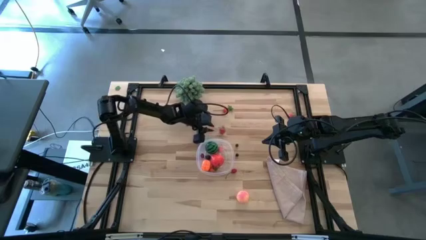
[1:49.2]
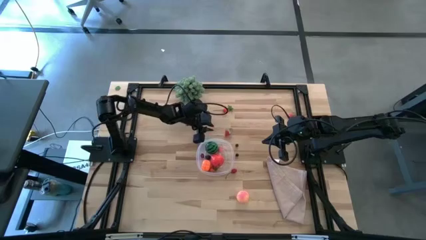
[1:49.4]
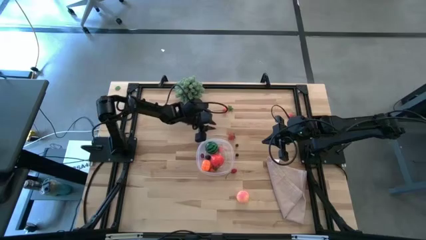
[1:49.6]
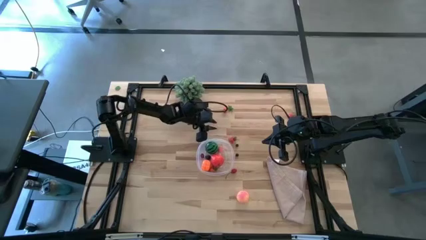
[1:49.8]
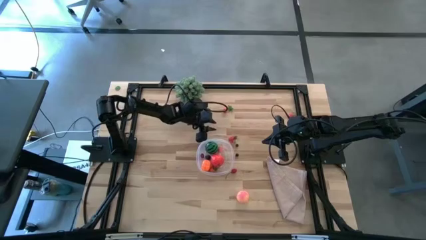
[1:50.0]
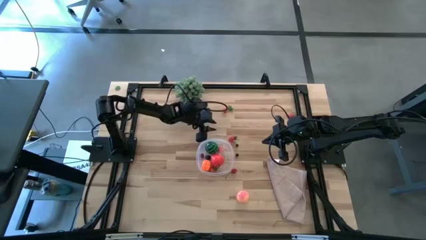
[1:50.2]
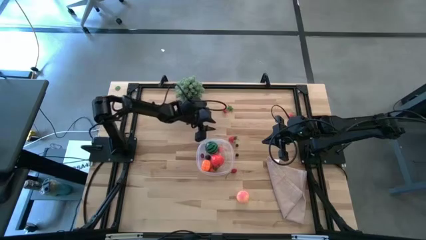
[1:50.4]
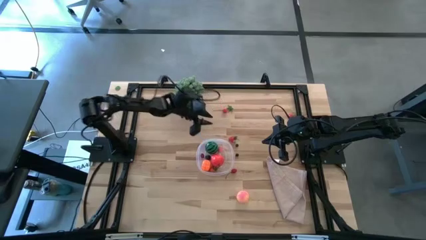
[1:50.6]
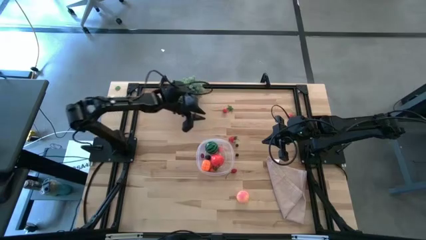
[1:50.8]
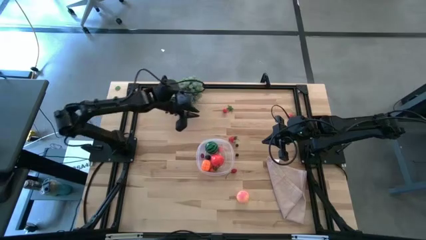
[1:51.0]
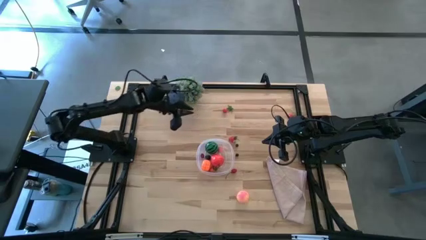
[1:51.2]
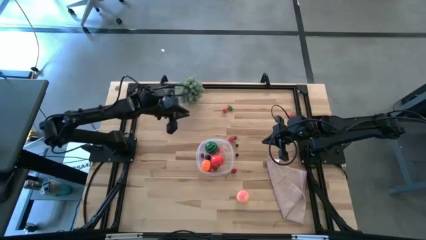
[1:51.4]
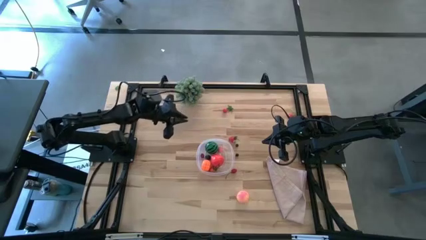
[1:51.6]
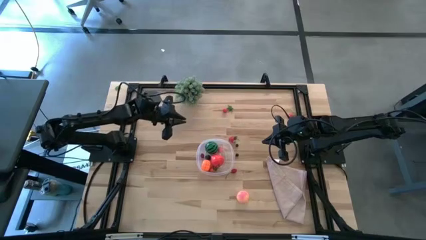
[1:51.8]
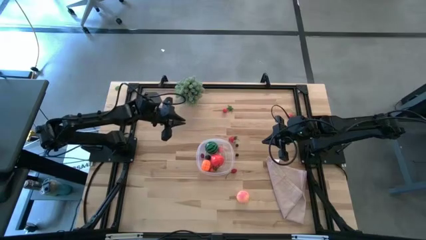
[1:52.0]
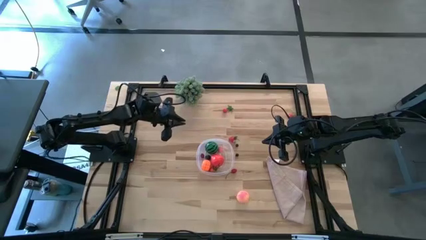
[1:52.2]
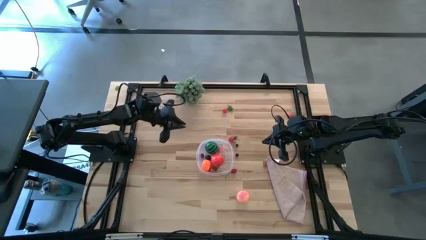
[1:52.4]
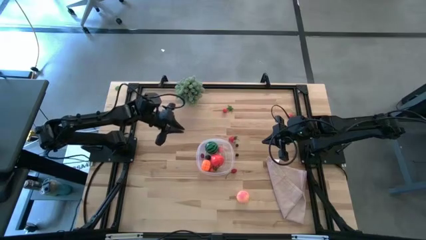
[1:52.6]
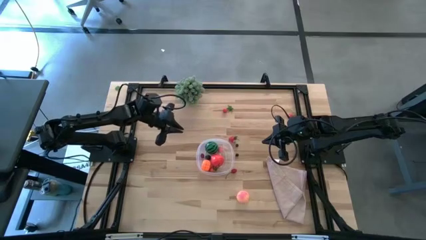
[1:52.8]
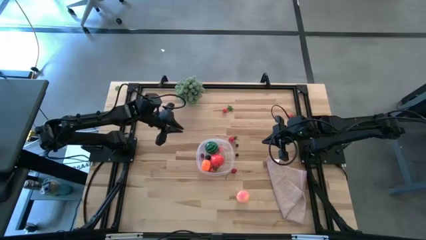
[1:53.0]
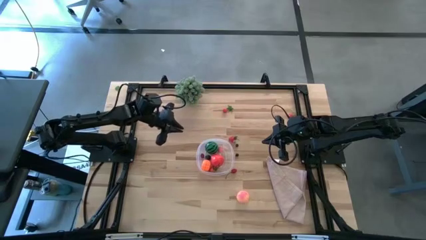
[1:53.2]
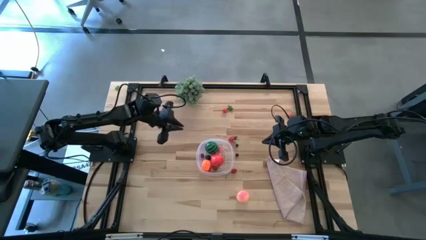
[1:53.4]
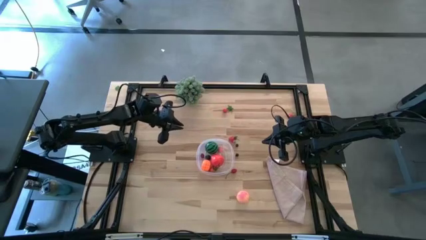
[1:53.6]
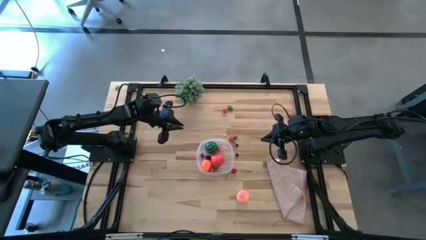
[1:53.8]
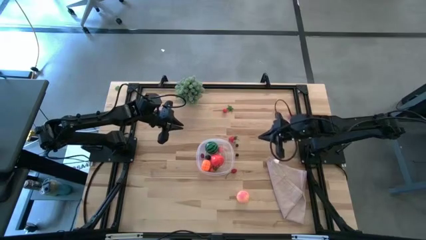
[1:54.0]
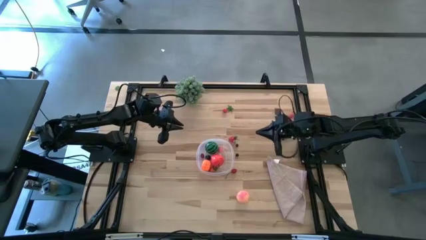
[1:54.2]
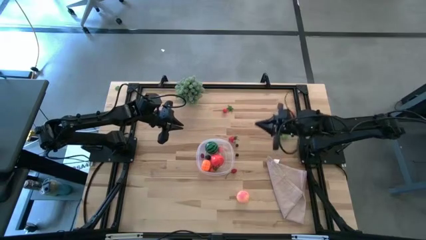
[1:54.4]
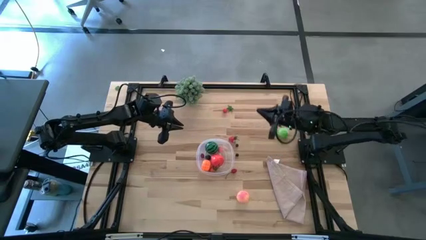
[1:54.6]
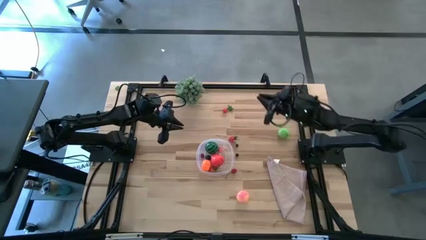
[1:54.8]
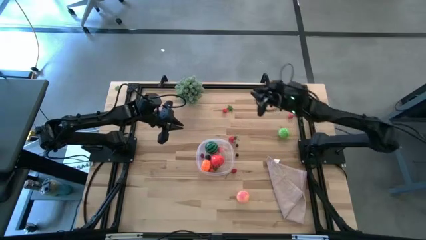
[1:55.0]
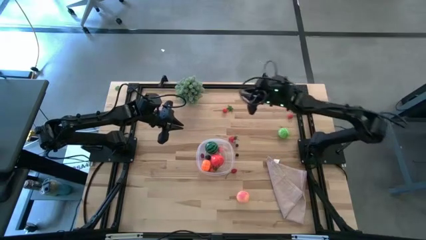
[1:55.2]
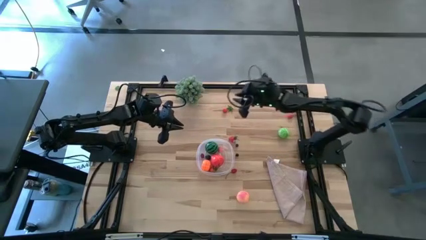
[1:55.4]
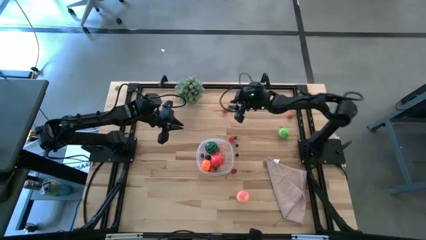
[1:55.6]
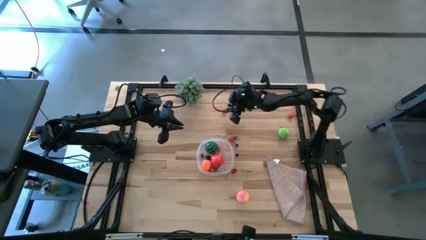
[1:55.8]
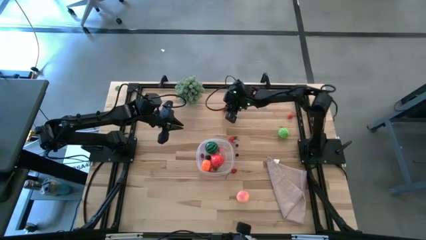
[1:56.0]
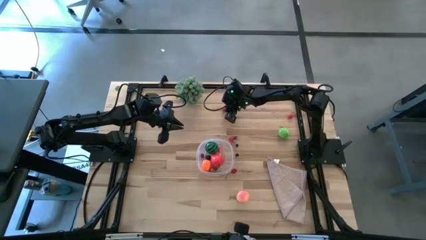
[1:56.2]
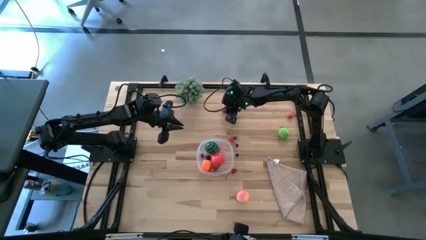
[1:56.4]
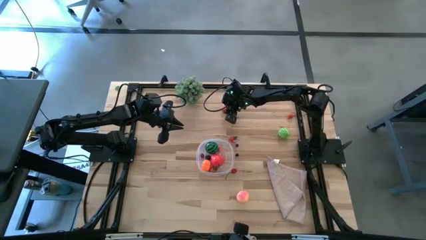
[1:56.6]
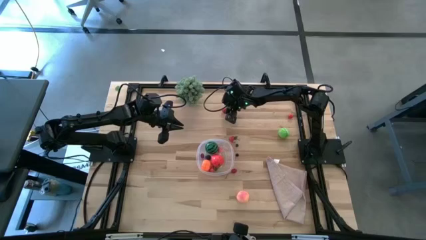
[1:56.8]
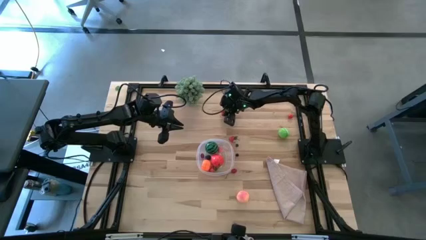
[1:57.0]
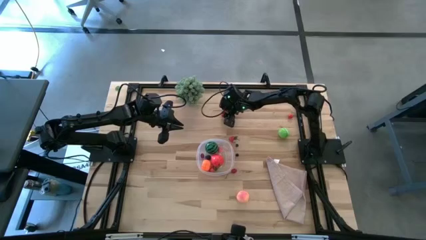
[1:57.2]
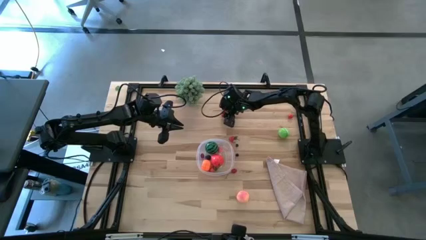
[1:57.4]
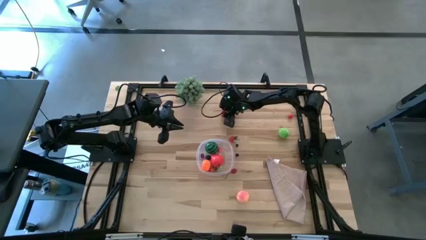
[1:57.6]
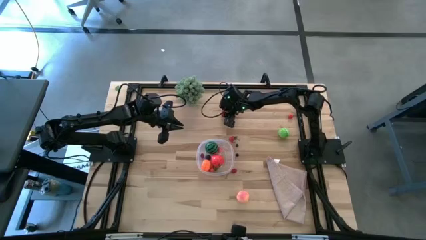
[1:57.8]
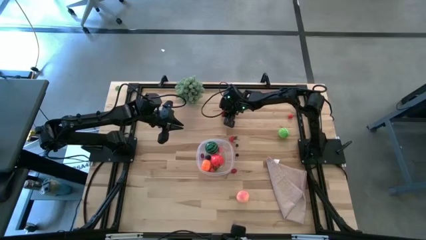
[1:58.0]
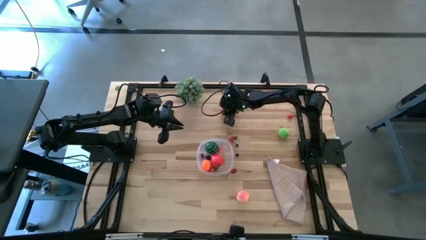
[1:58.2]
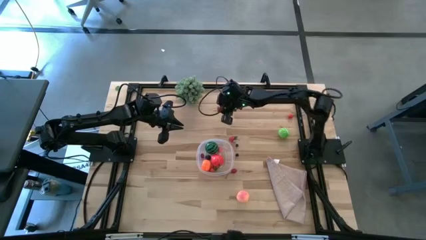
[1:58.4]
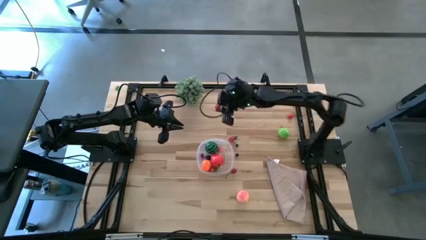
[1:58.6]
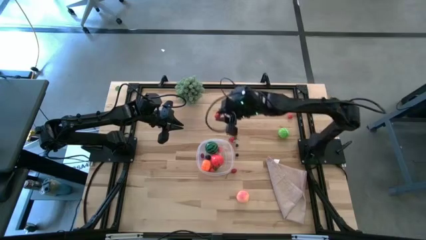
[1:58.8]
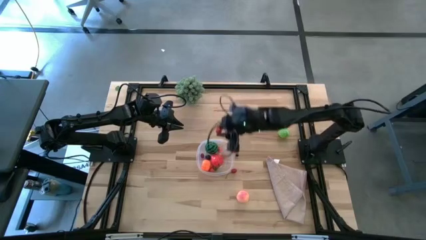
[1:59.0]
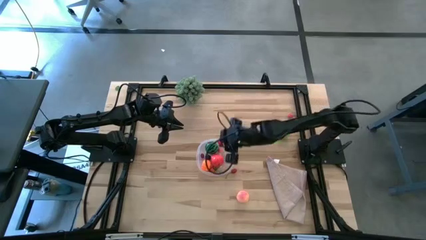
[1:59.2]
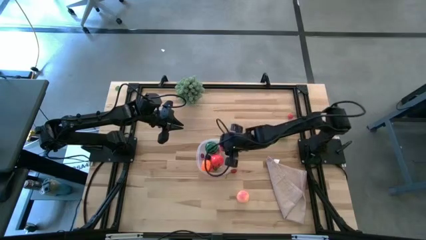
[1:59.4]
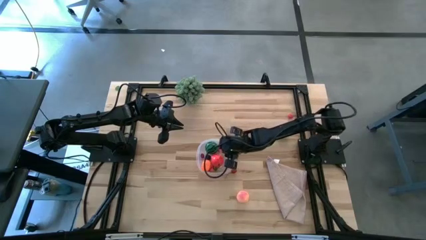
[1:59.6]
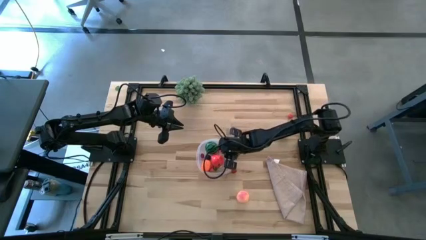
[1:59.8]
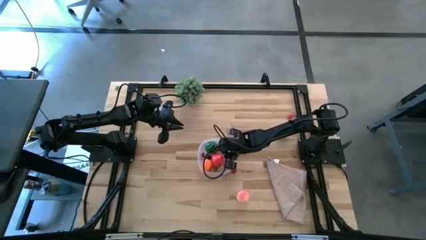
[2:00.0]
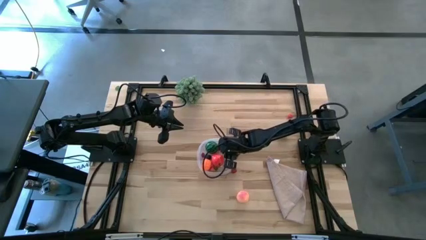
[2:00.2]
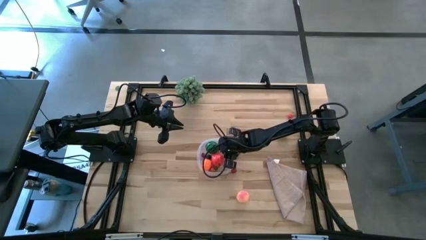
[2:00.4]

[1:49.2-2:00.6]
Task: Pick and placing Produce into tupperware
Put the top left cherry into the transparent container

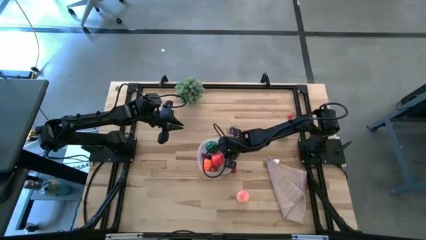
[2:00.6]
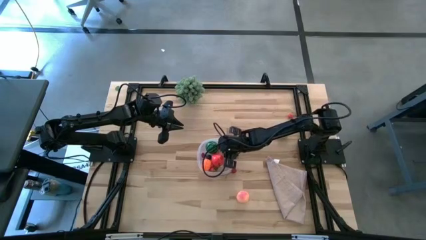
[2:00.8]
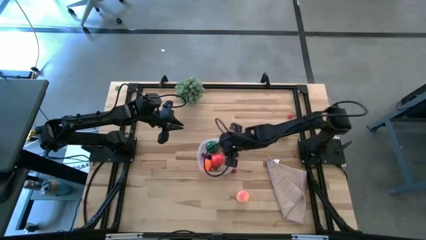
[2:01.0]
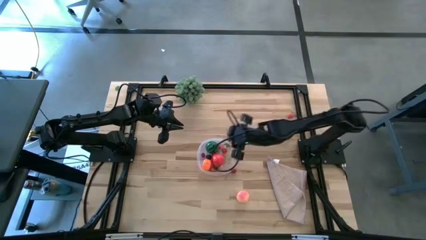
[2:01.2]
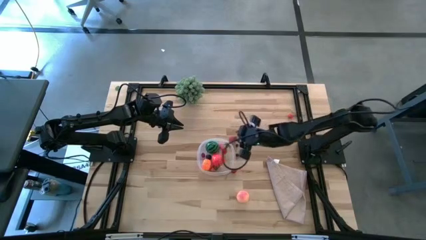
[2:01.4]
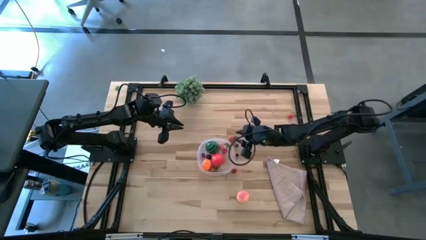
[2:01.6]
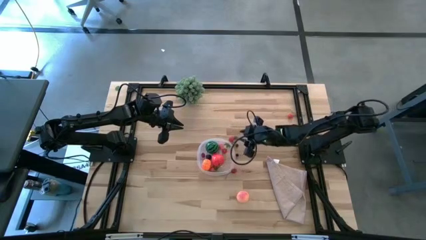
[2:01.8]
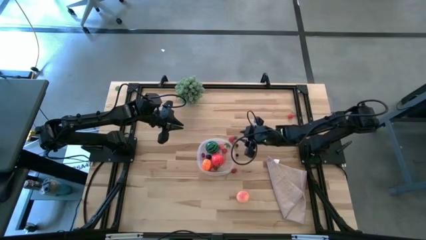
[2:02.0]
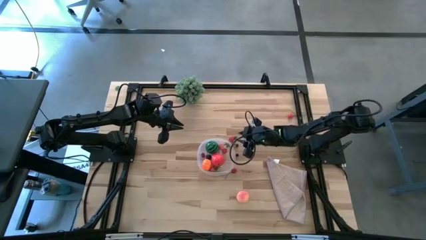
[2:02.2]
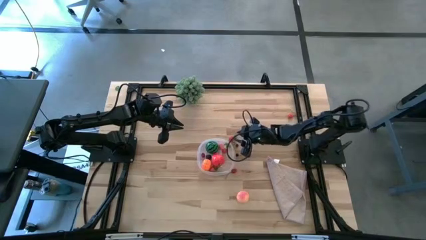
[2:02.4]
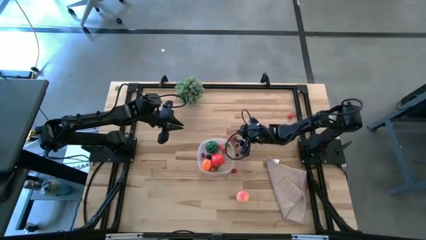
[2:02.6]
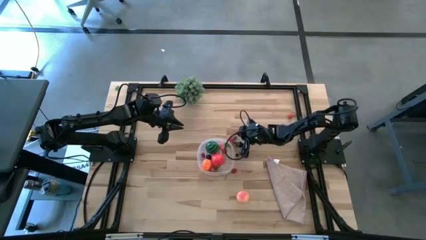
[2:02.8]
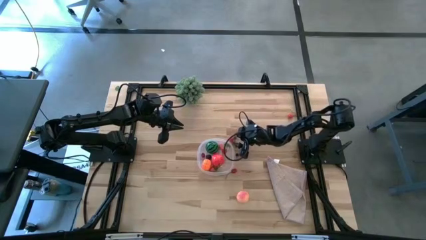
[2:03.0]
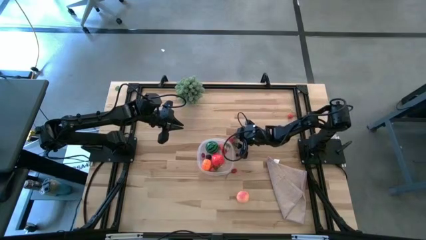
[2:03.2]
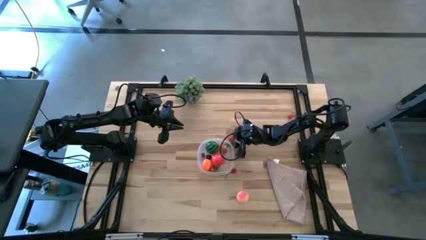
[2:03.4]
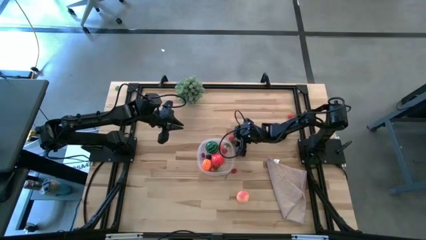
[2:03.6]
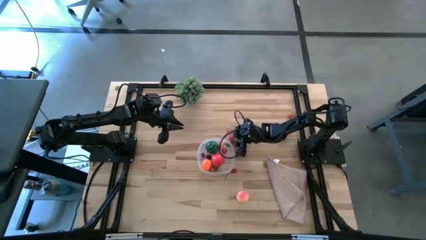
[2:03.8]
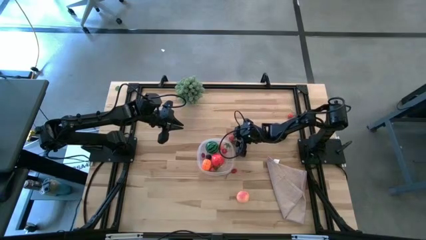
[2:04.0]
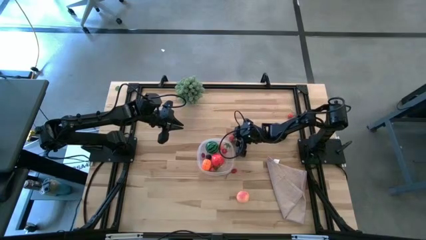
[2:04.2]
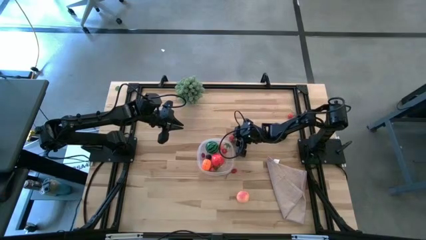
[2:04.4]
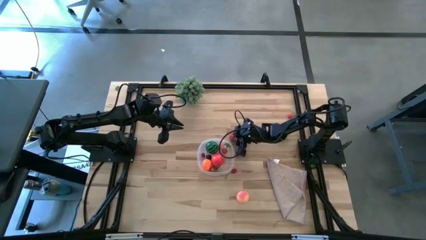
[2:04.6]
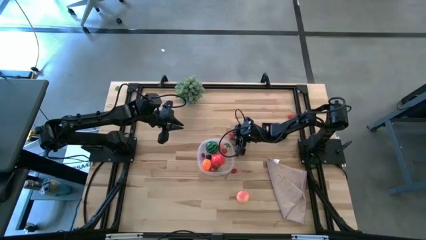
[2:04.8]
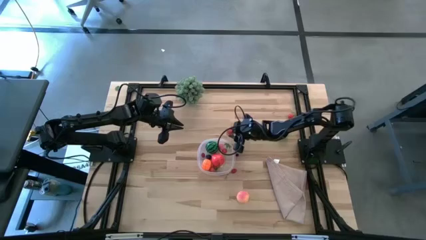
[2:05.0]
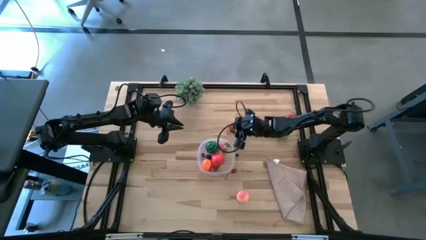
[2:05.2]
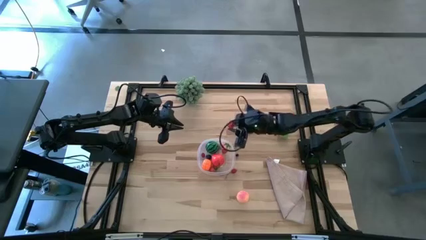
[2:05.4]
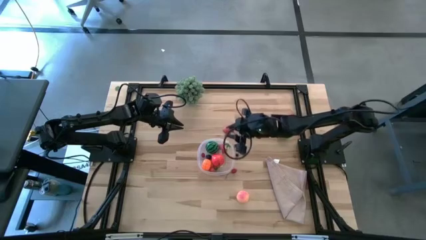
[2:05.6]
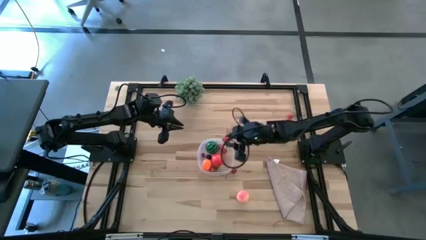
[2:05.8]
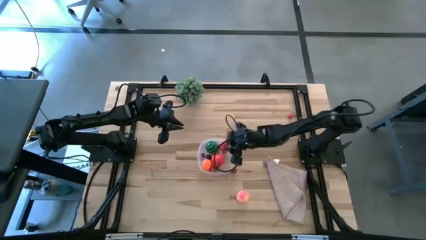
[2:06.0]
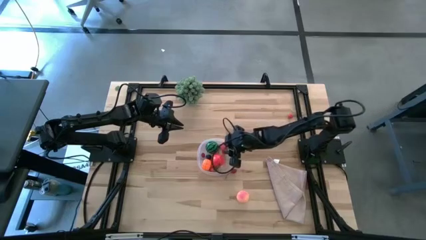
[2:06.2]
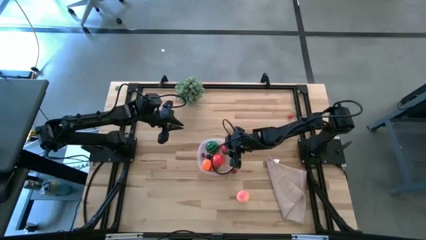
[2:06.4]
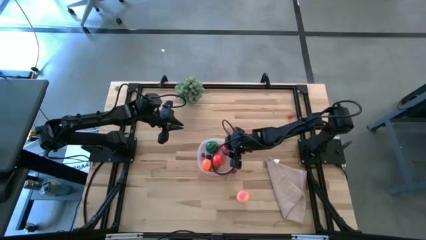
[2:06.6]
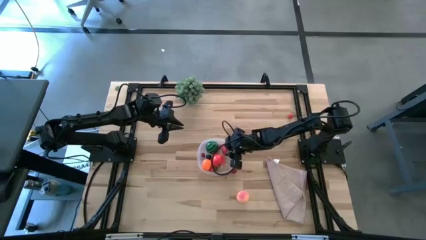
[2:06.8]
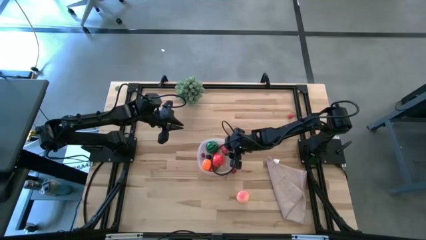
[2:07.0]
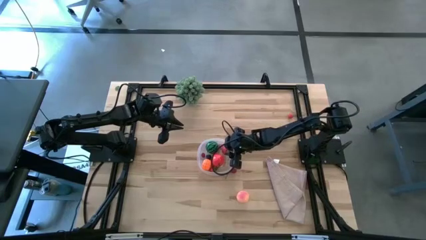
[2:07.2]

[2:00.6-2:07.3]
Put the strawberry into the transparent container
